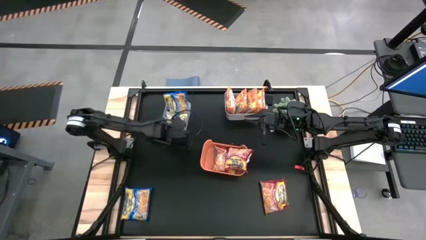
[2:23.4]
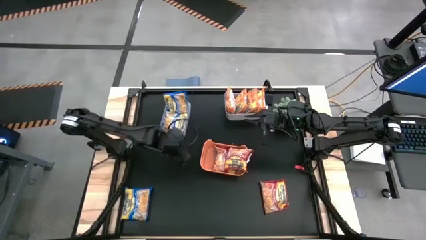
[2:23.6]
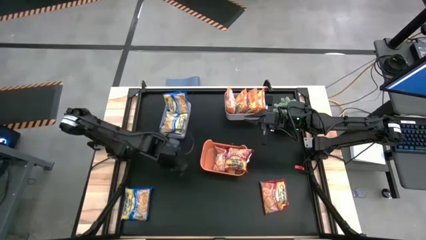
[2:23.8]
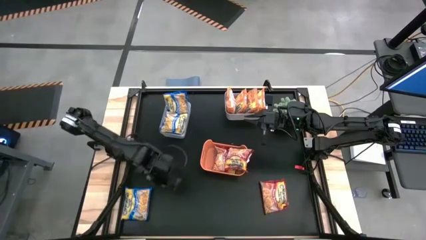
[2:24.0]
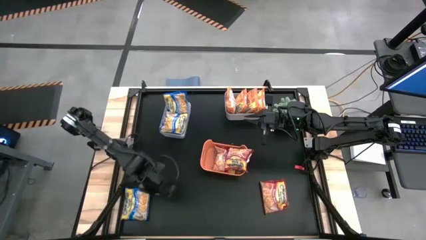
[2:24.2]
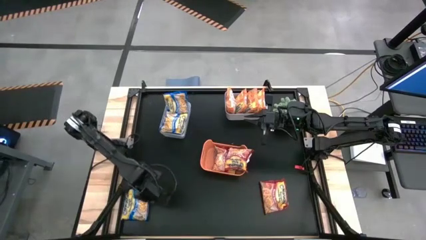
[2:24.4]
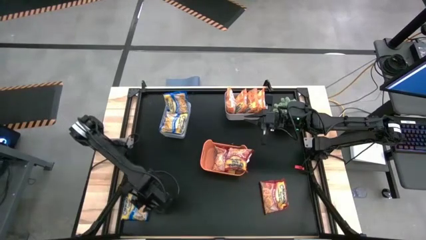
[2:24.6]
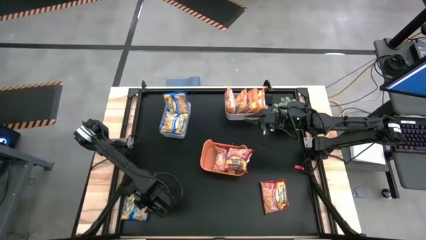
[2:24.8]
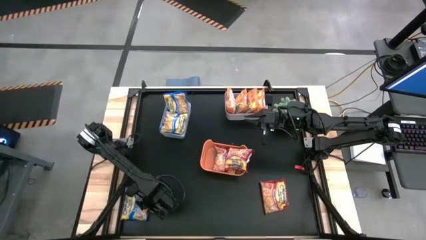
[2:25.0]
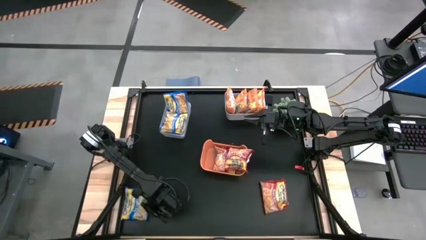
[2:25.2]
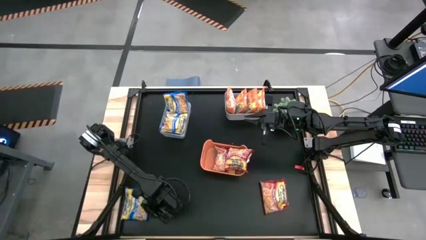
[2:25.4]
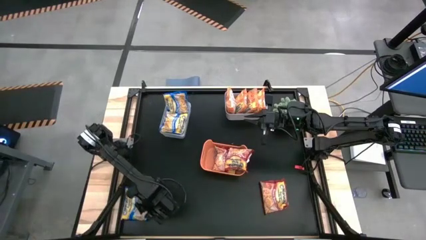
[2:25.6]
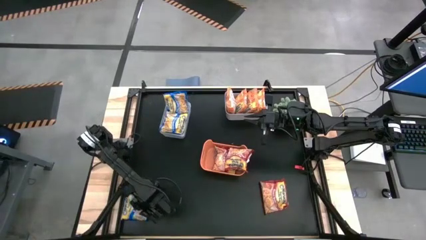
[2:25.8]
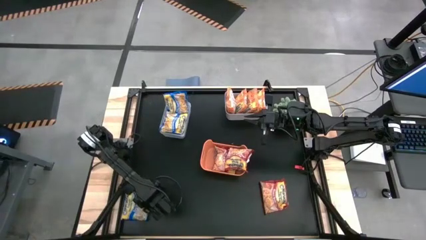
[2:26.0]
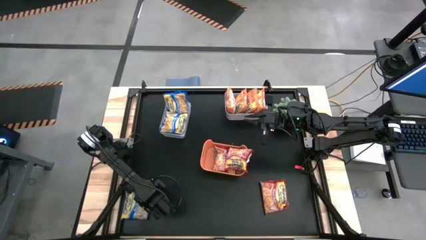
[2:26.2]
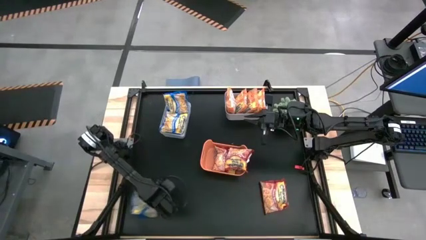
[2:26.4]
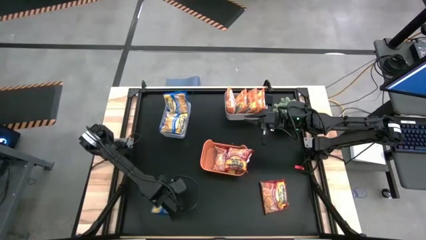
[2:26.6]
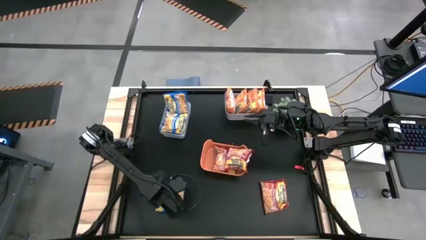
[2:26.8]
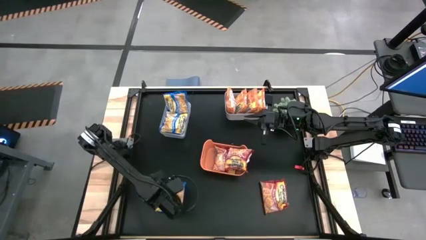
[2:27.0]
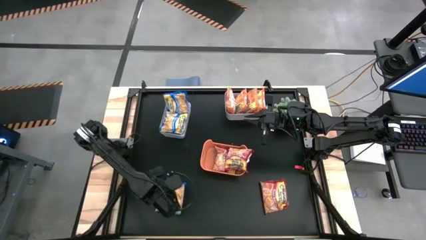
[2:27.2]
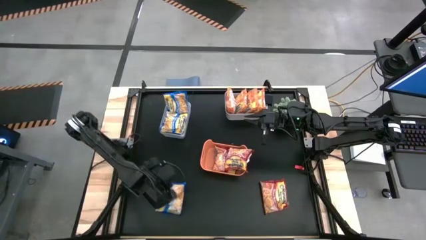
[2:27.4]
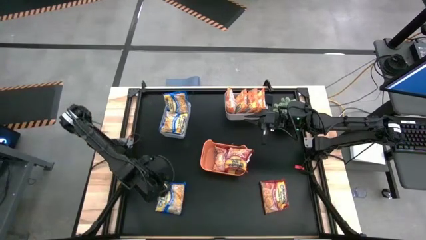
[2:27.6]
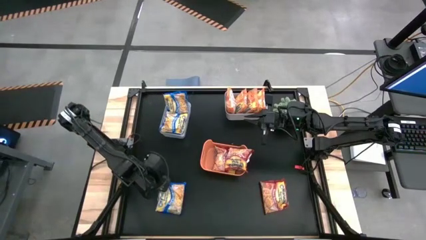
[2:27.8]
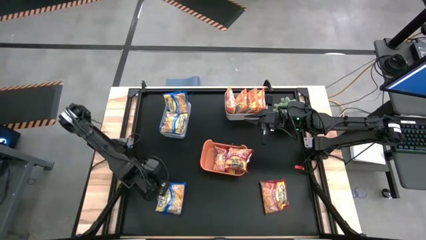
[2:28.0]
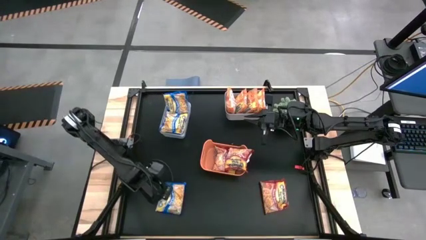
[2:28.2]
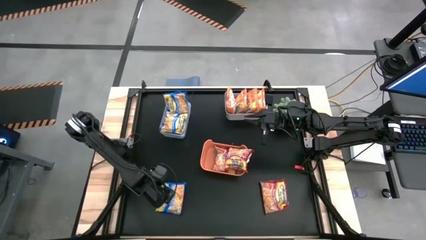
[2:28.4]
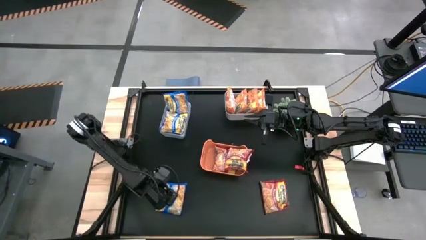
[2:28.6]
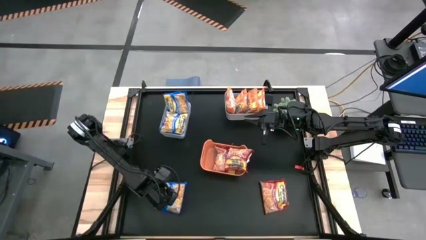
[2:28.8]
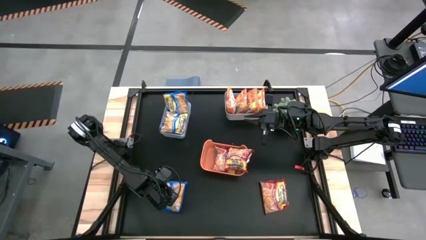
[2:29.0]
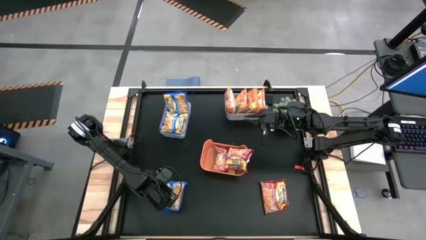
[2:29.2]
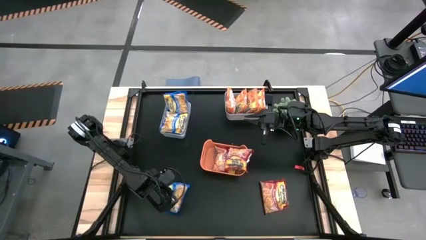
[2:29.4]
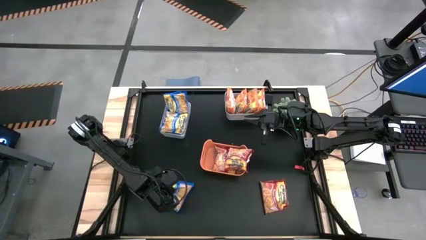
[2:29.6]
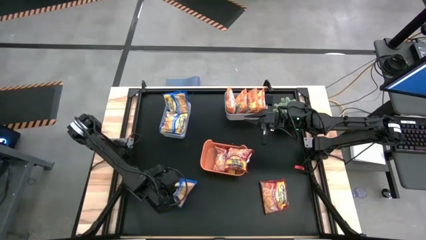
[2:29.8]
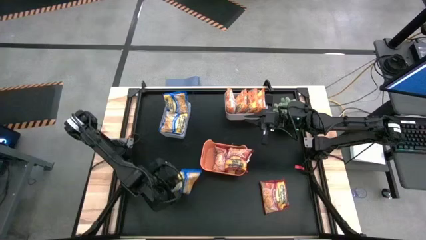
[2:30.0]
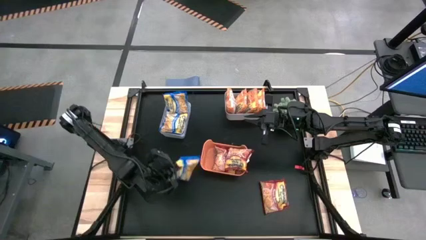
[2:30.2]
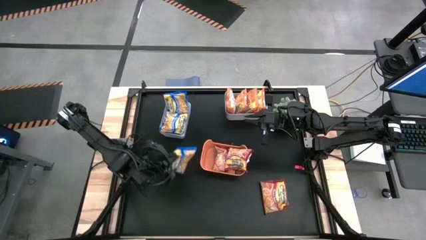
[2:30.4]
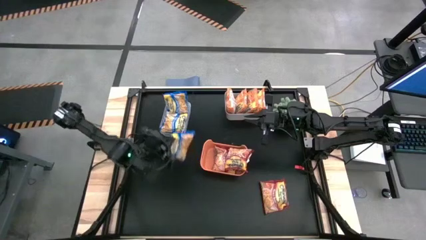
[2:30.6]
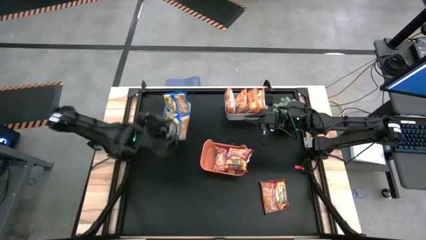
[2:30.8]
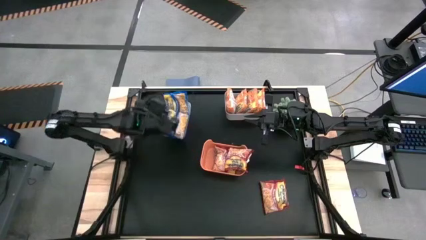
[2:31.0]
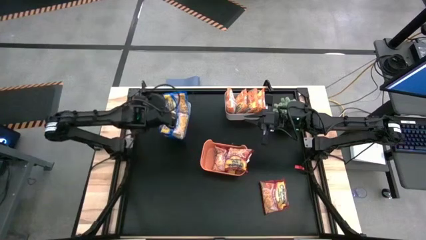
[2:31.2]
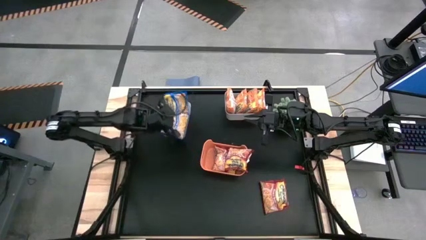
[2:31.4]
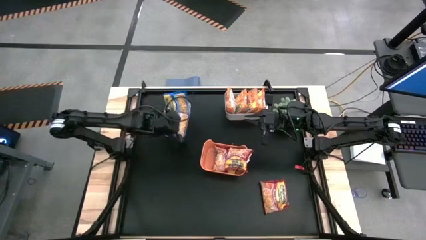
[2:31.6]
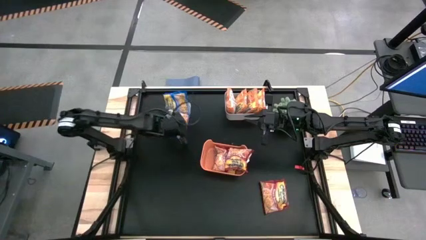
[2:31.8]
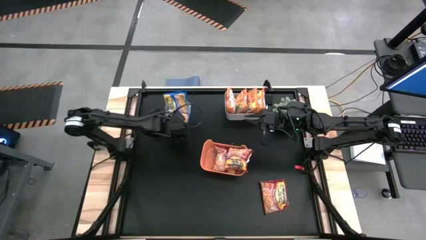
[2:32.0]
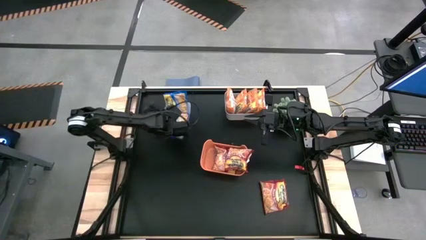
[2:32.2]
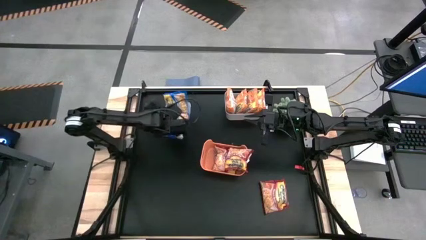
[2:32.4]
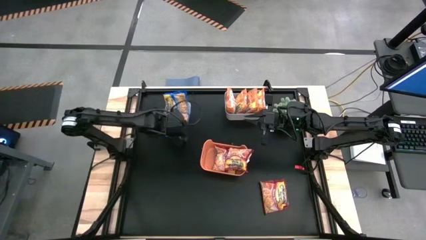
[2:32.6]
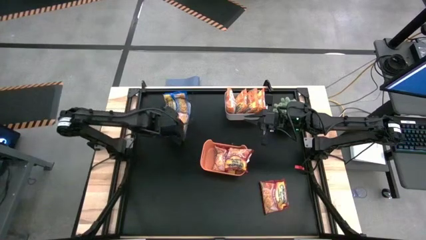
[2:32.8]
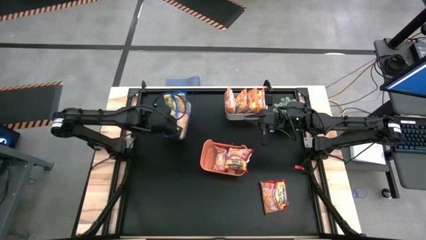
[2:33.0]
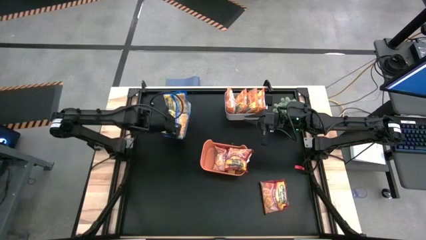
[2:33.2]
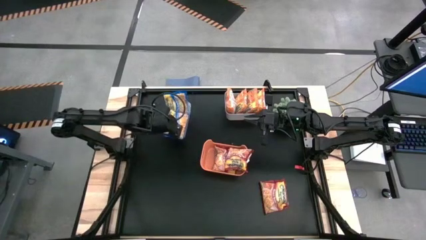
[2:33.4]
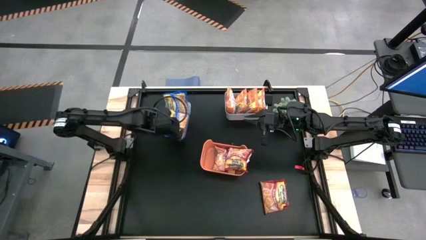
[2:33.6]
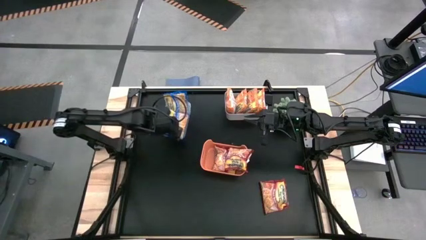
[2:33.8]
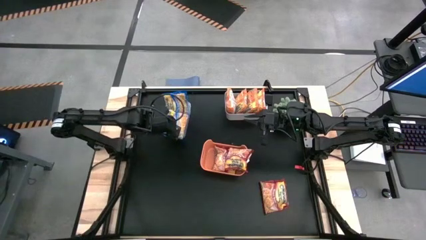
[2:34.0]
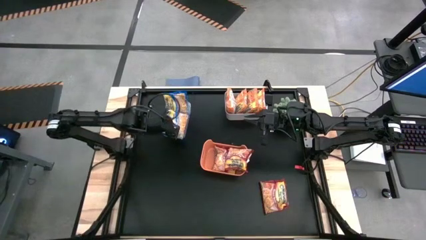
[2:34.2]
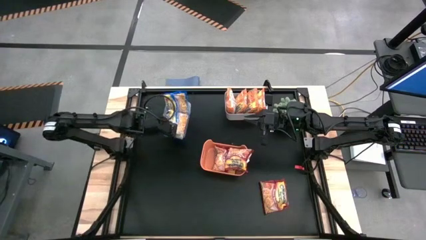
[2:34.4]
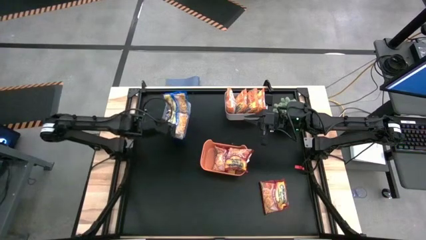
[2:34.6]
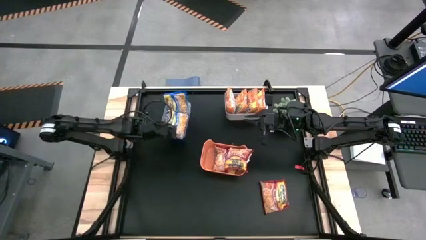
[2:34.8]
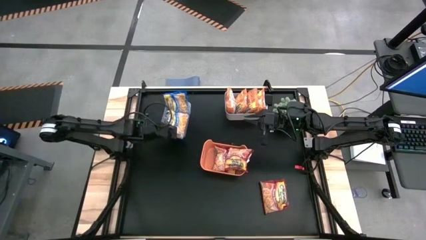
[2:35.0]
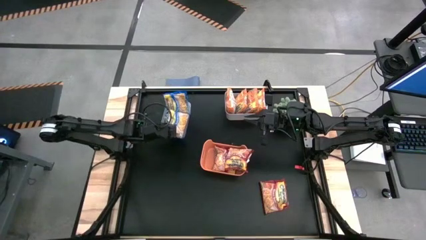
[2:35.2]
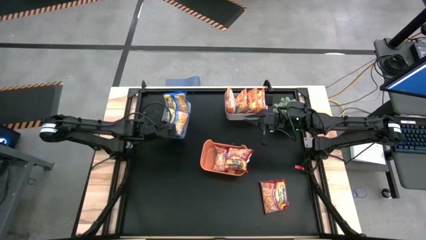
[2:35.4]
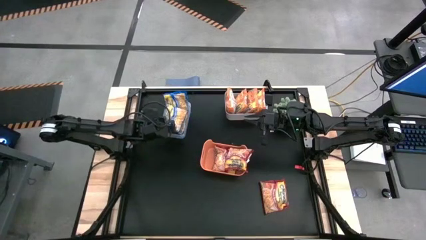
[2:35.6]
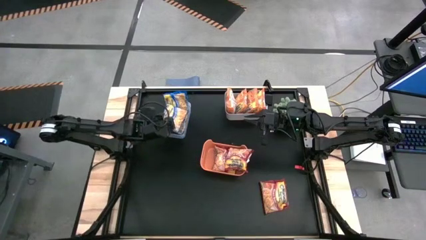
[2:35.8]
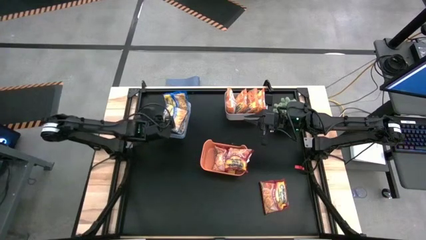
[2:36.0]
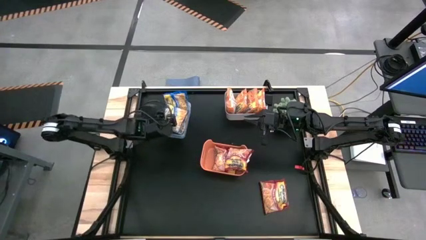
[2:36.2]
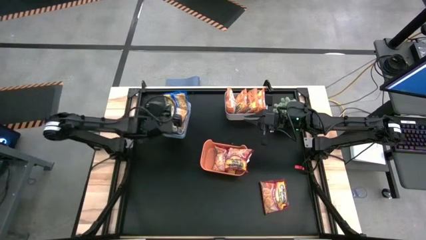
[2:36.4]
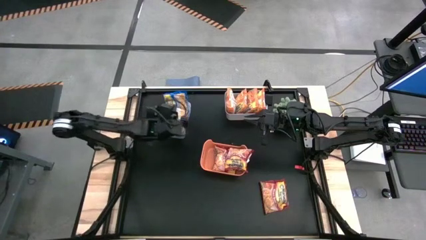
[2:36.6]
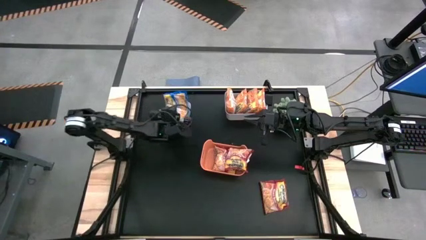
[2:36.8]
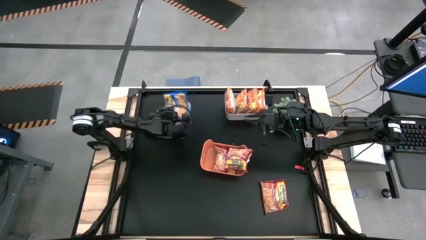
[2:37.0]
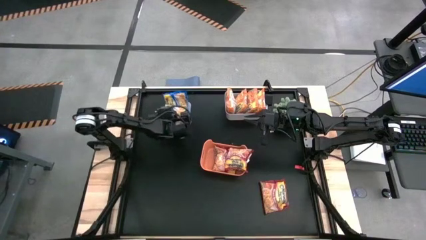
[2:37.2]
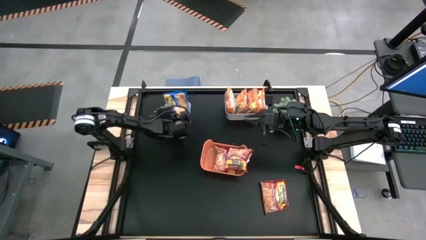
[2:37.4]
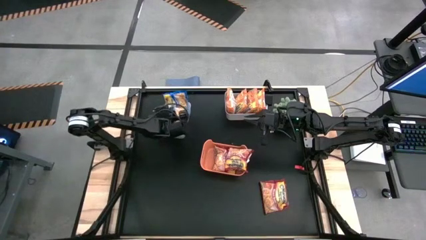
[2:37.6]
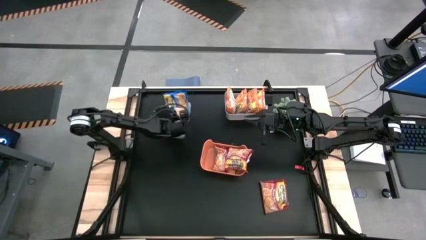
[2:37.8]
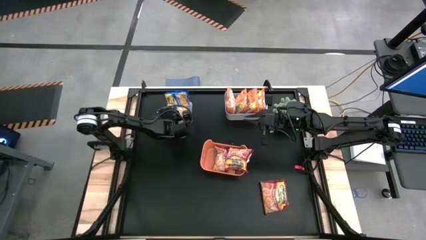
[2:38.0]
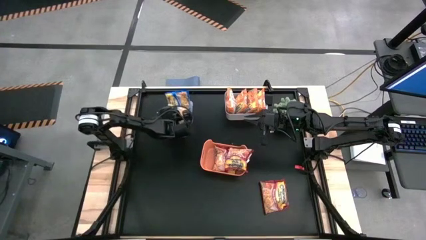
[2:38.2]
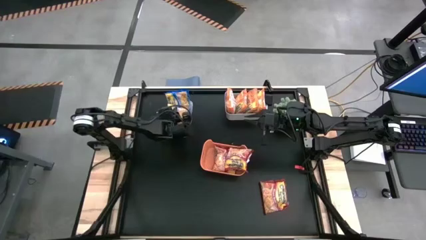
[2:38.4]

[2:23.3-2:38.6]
Task: Sort Maruchan noodles
Put the blue noodle packet into the transparent bin
